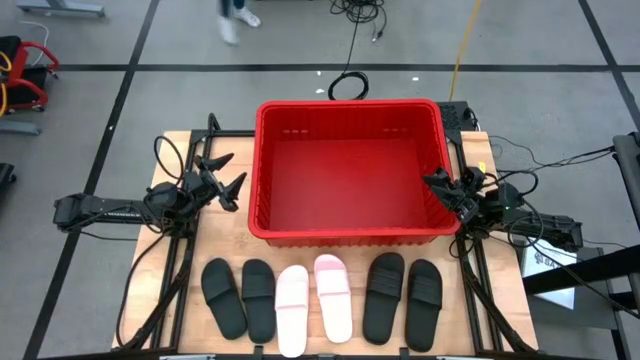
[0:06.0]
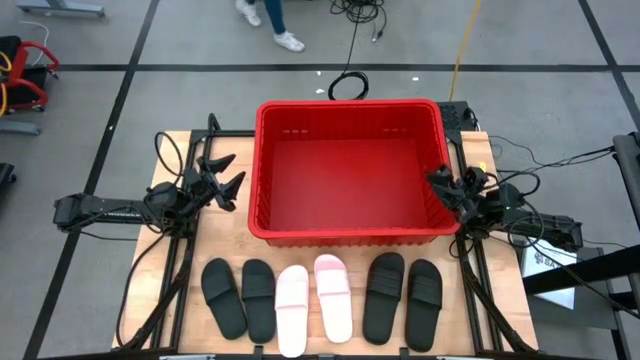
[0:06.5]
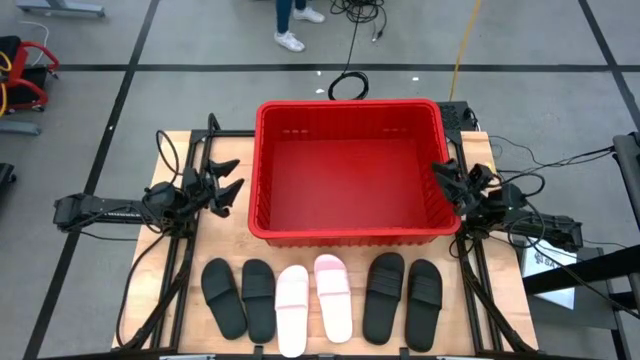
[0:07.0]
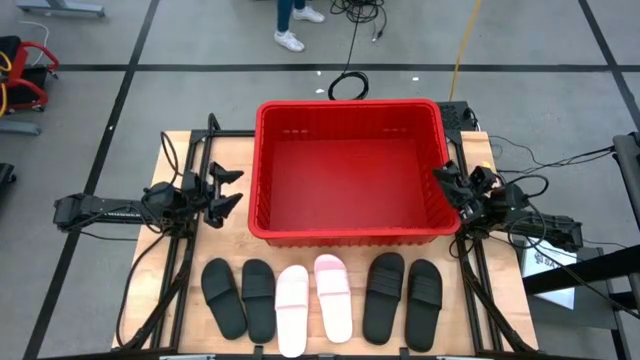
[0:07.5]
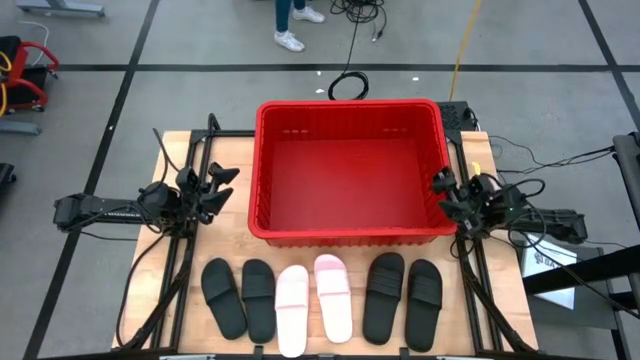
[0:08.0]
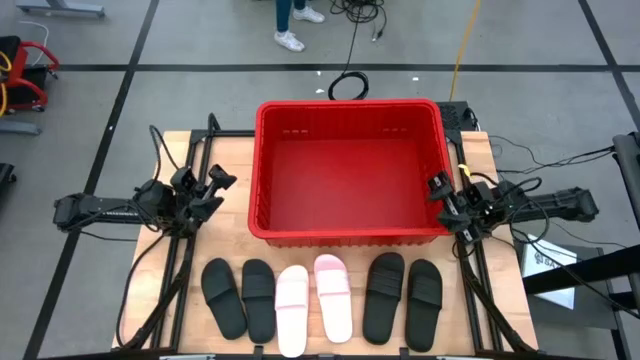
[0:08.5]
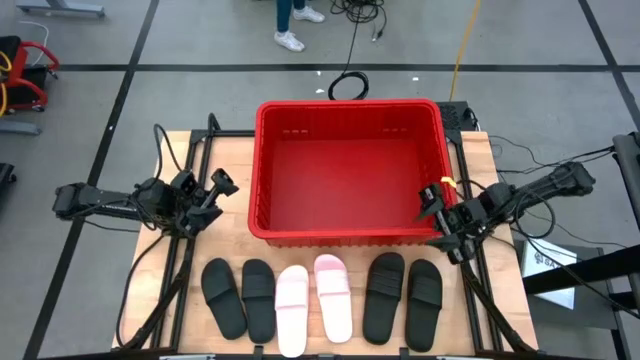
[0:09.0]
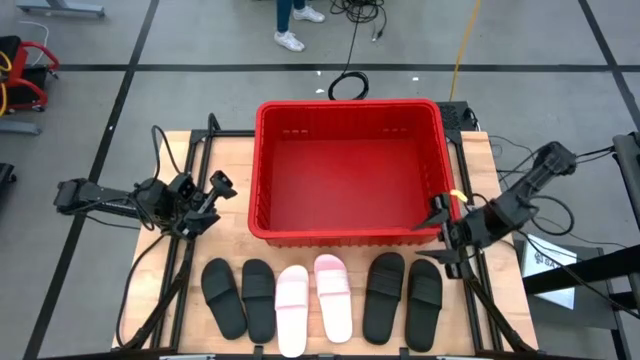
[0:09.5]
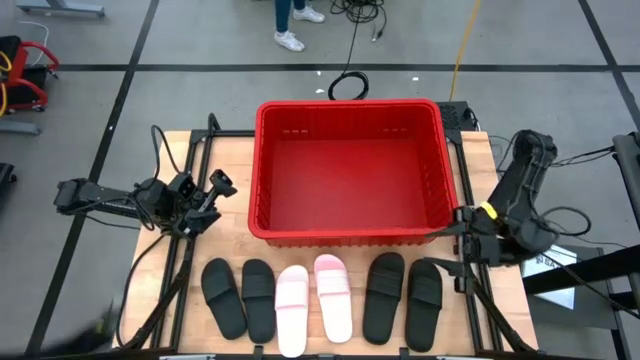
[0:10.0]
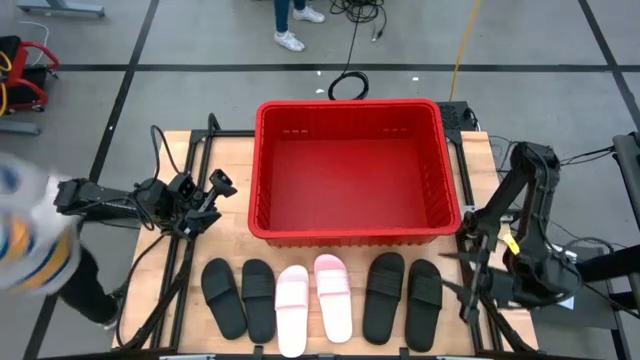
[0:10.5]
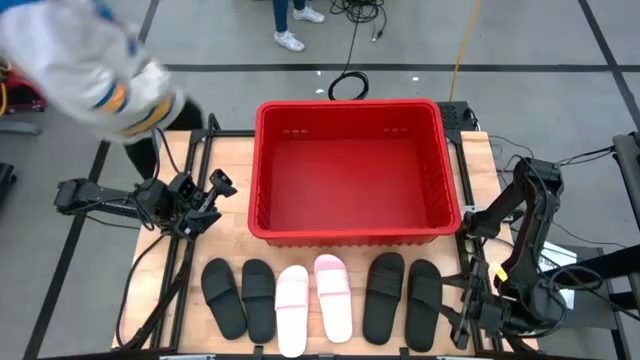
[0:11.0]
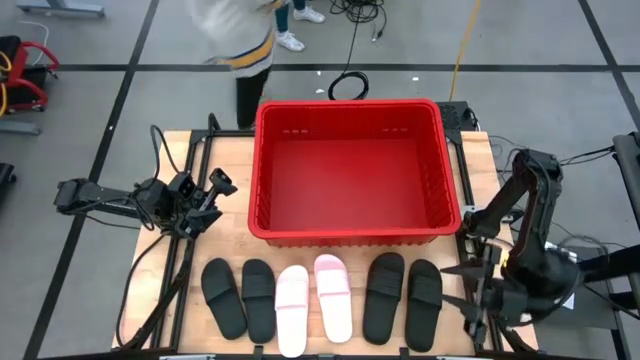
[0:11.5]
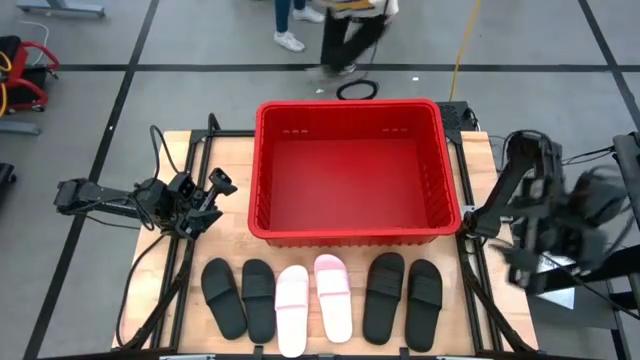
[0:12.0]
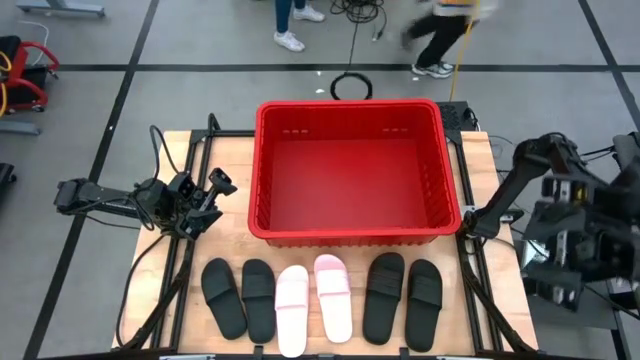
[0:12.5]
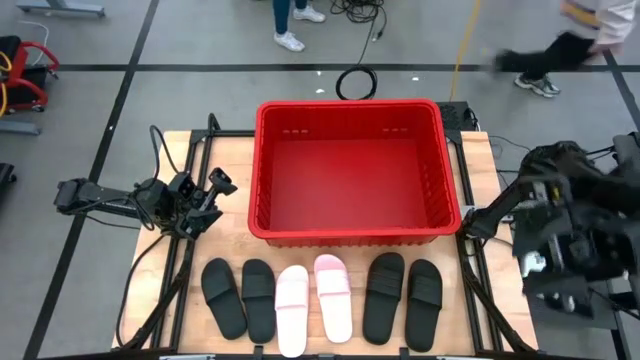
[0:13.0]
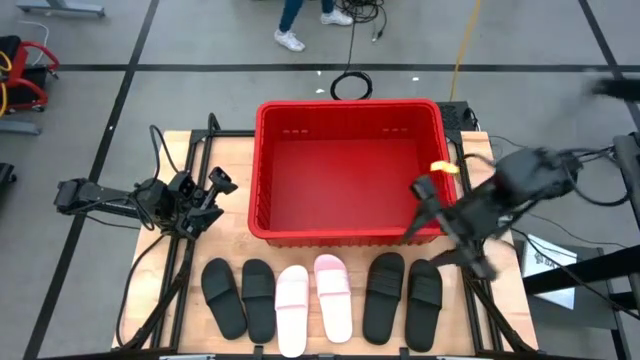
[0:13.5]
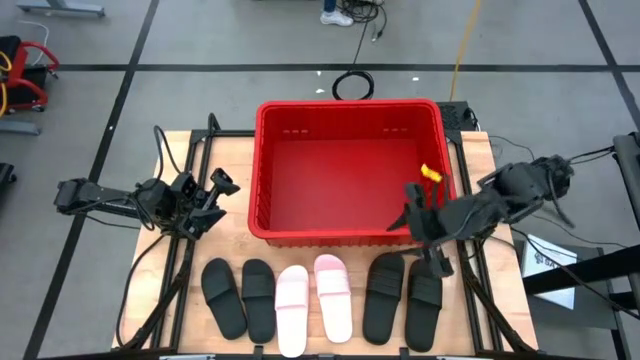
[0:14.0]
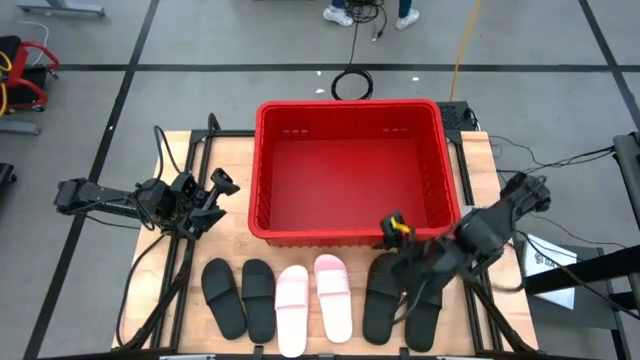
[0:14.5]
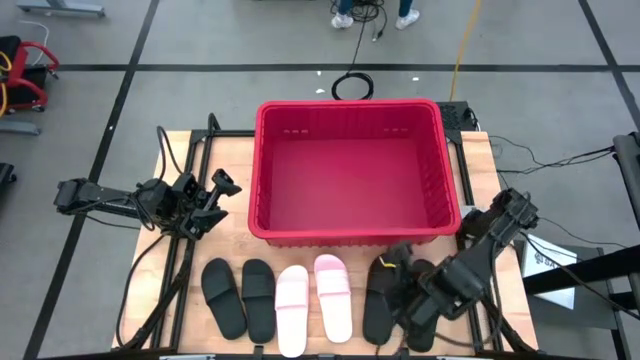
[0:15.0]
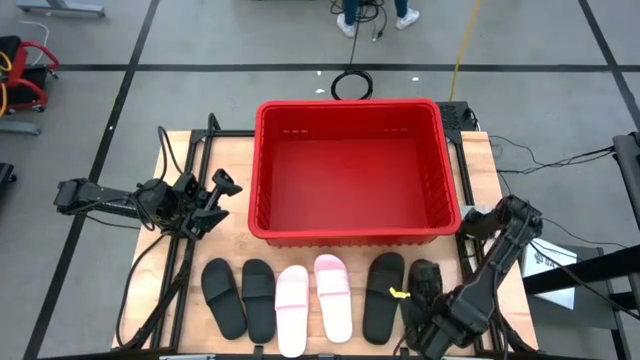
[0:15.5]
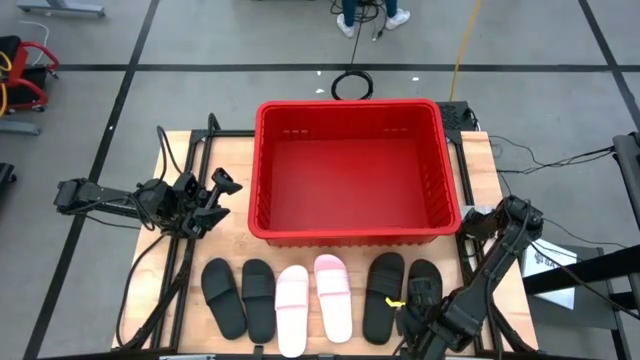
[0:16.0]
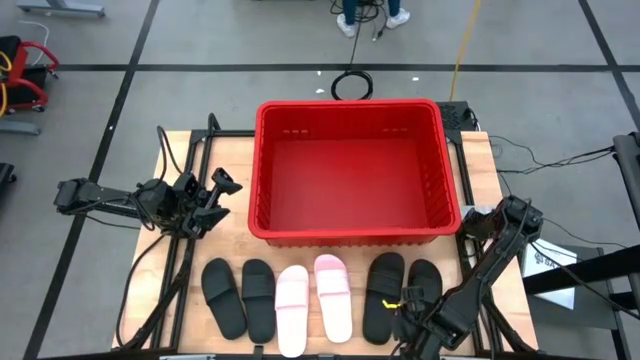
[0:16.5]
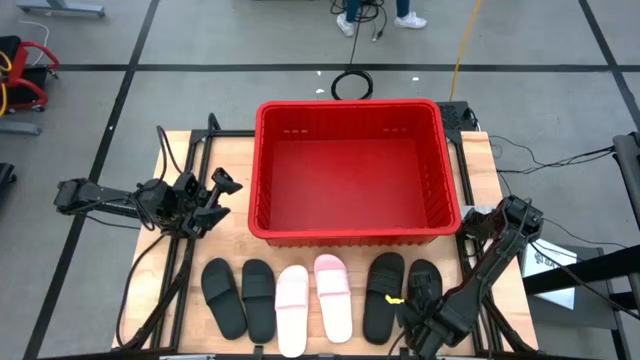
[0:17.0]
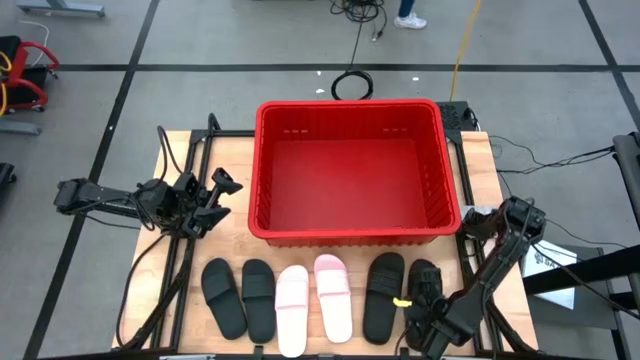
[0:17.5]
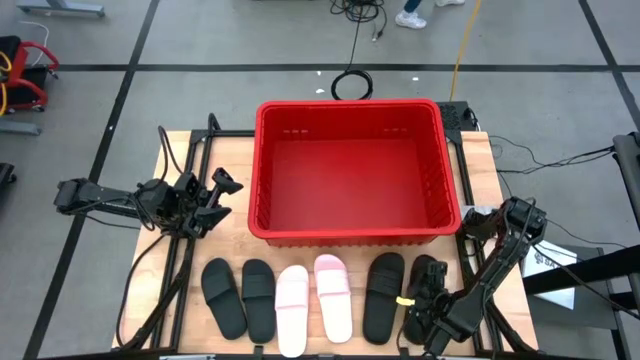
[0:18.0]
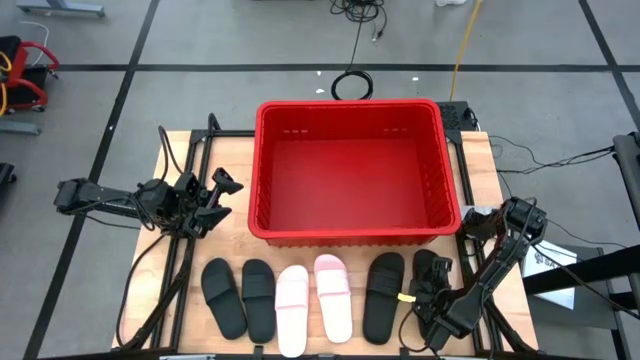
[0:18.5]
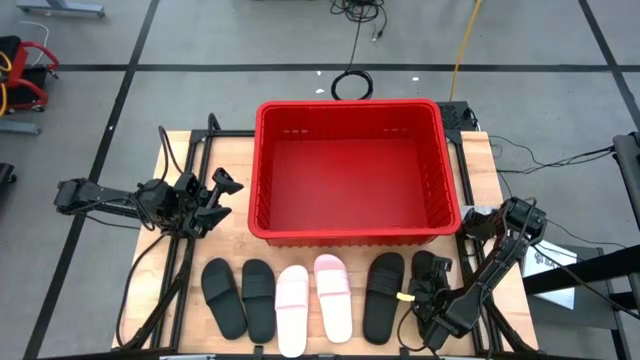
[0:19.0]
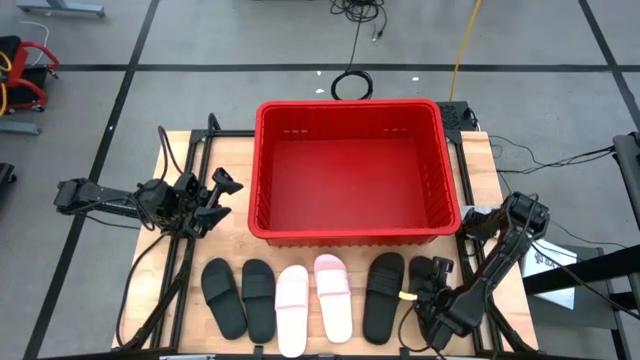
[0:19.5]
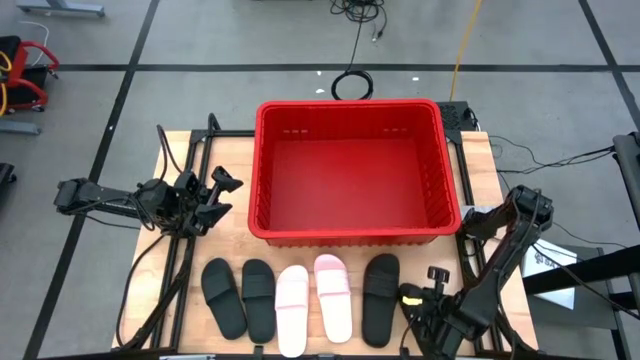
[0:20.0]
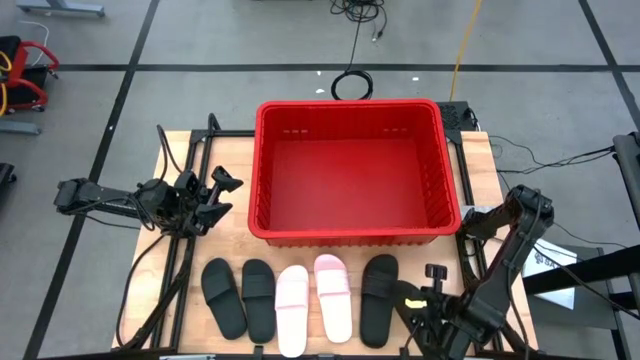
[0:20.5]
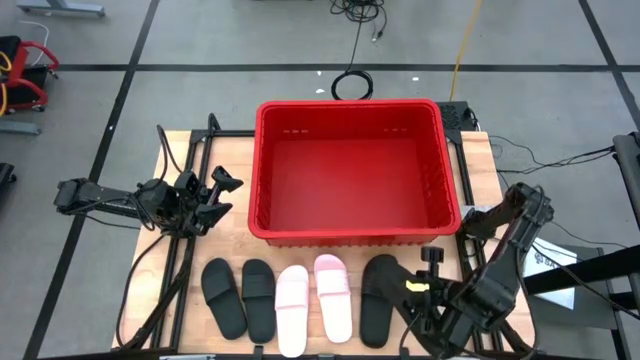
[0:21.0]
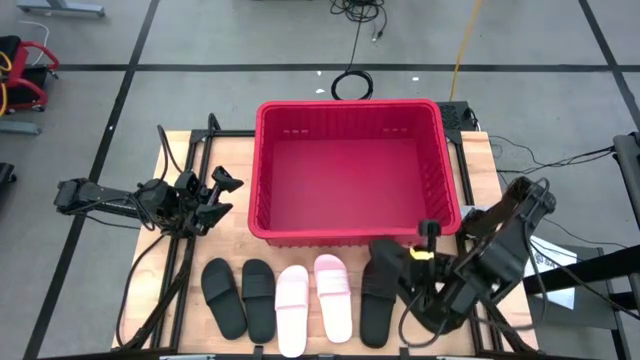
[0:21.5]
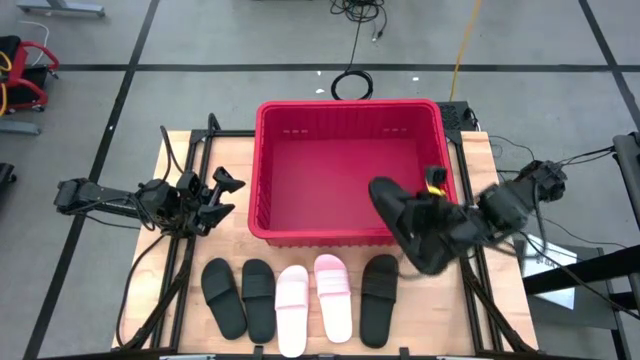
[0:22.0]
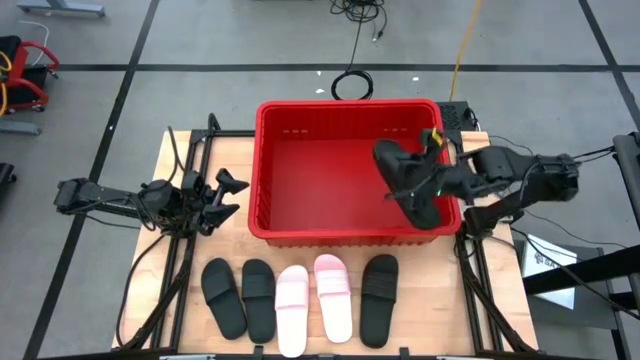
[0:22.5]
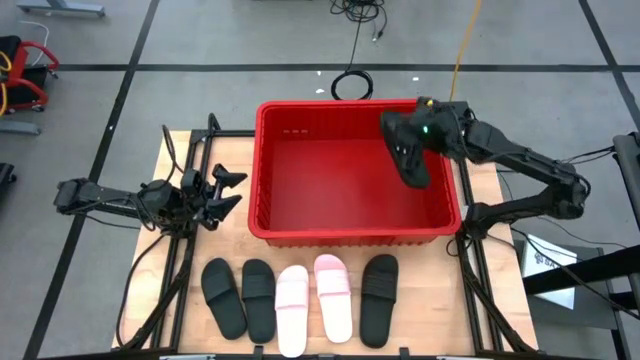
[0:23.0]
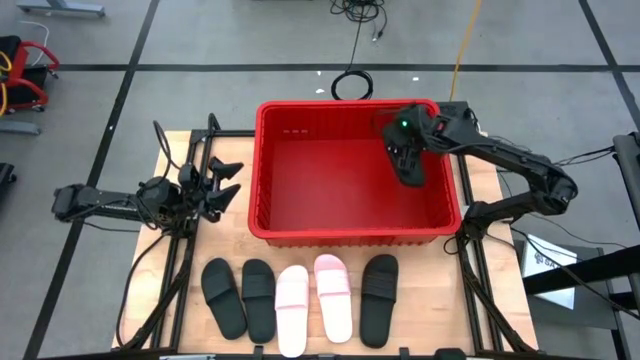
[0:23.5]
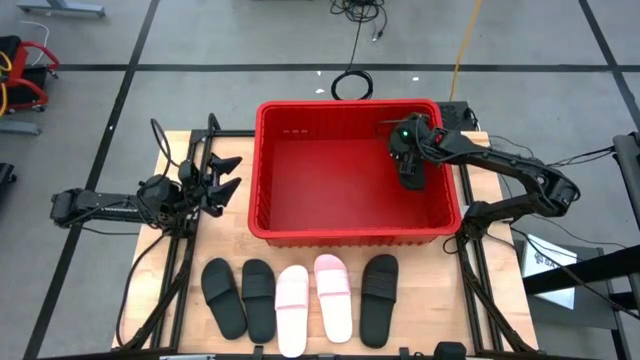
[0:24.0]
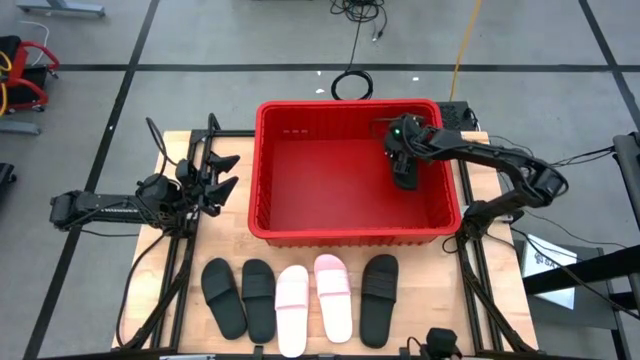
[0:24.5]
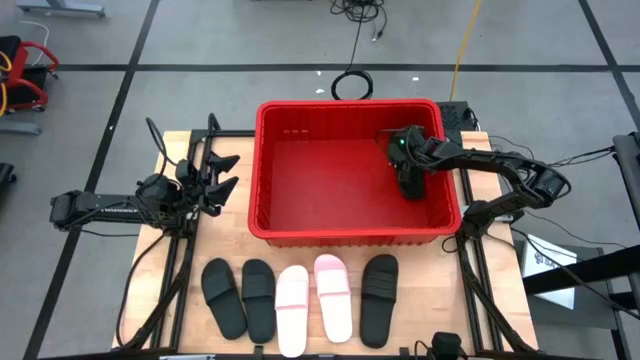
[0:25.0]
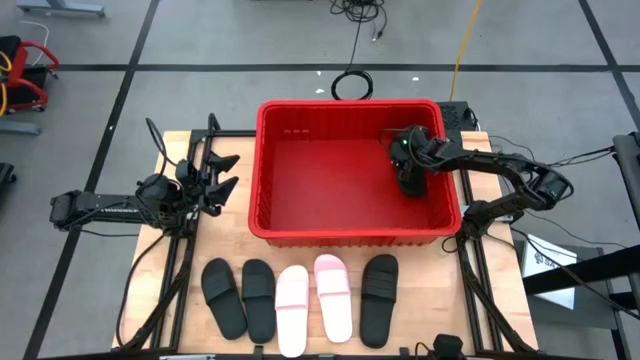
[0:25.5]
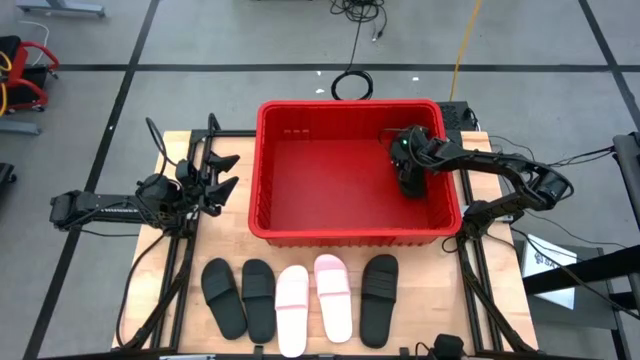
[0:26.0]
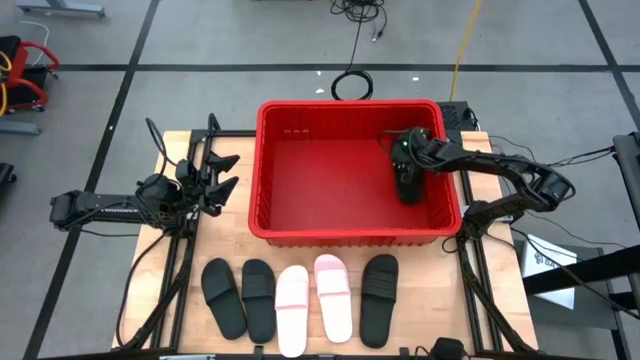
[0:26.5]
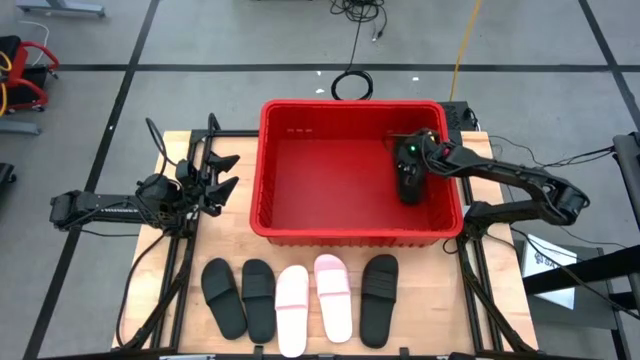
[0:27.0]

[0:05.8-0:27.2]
Task: Pick and place slides into bin
Put the black slide into the red basket
